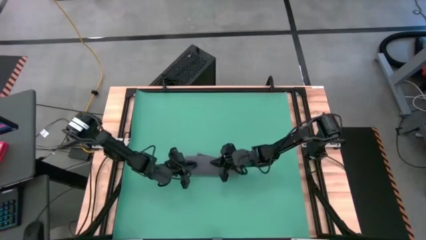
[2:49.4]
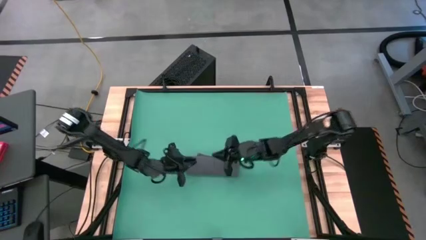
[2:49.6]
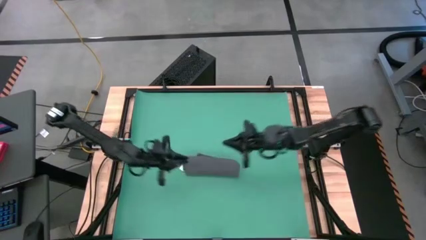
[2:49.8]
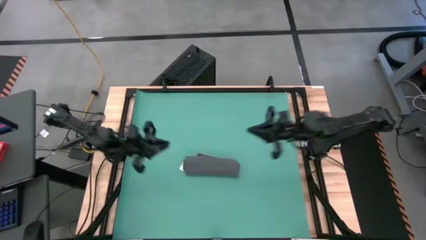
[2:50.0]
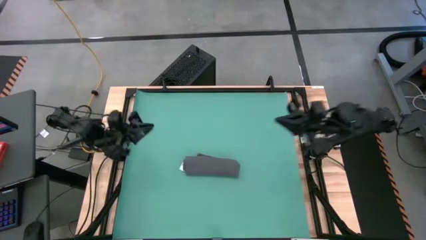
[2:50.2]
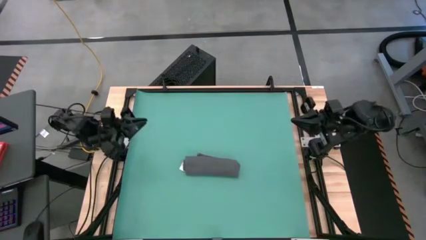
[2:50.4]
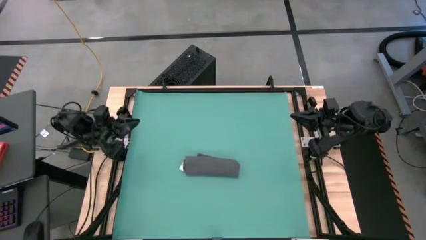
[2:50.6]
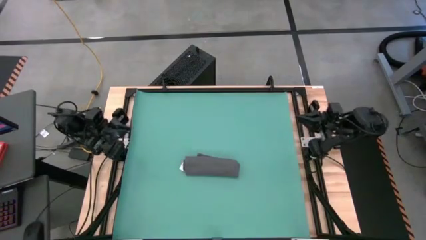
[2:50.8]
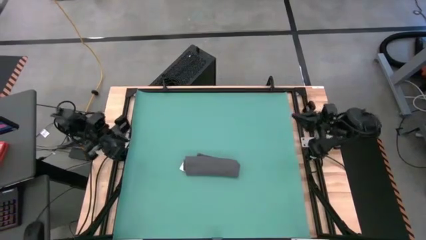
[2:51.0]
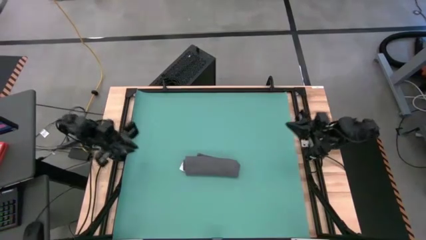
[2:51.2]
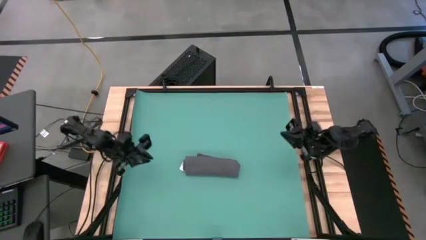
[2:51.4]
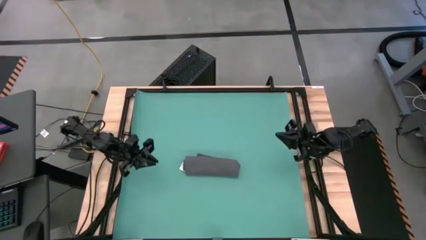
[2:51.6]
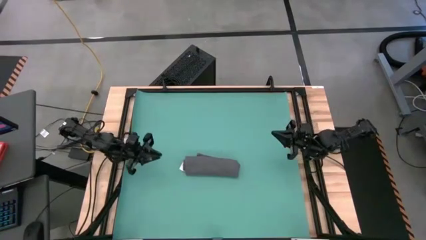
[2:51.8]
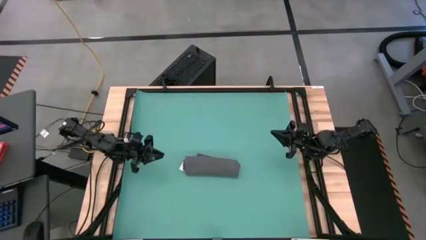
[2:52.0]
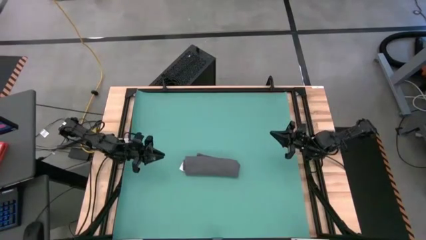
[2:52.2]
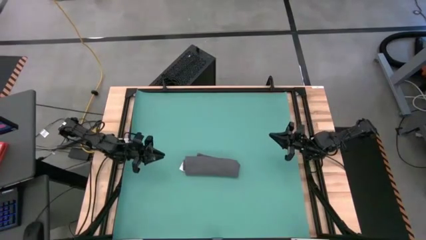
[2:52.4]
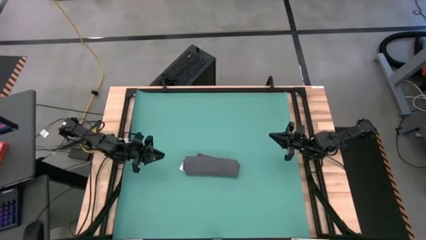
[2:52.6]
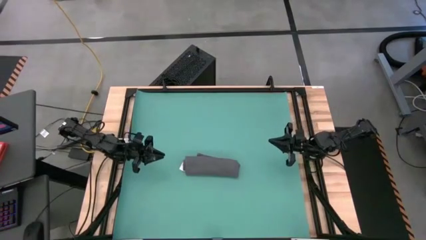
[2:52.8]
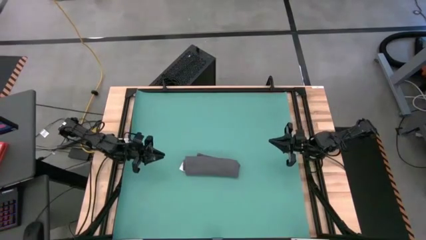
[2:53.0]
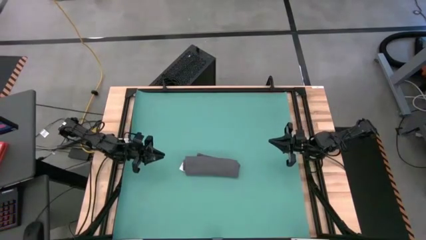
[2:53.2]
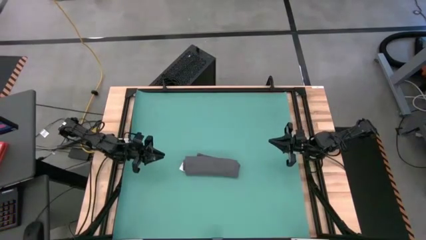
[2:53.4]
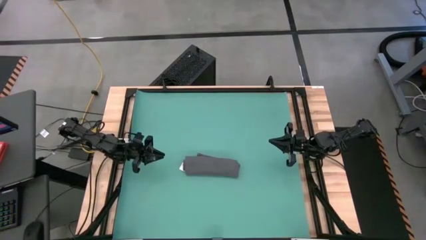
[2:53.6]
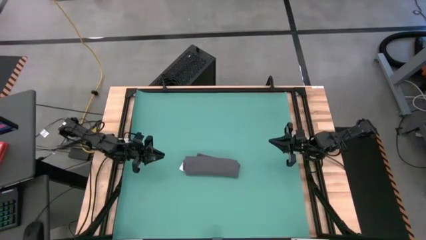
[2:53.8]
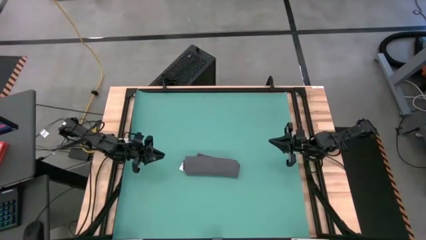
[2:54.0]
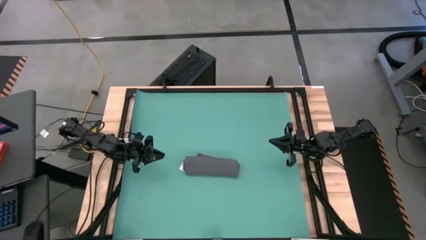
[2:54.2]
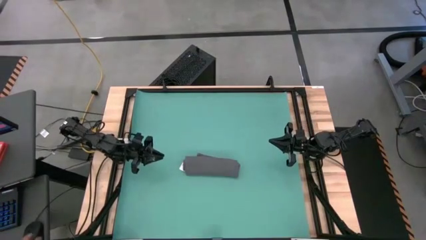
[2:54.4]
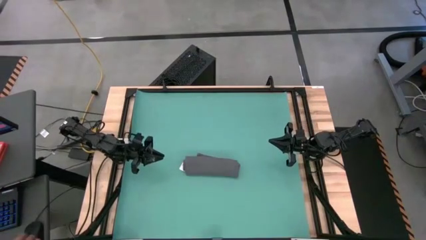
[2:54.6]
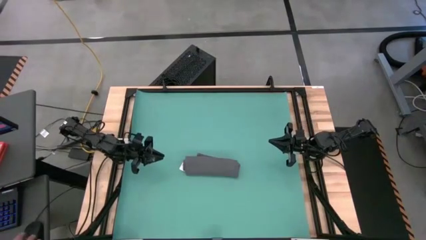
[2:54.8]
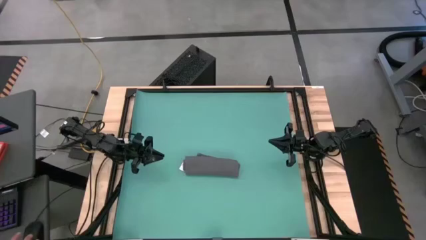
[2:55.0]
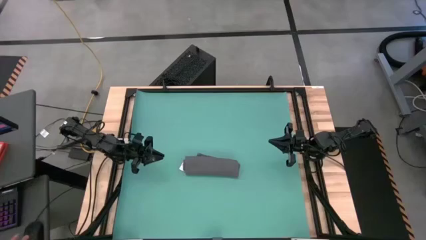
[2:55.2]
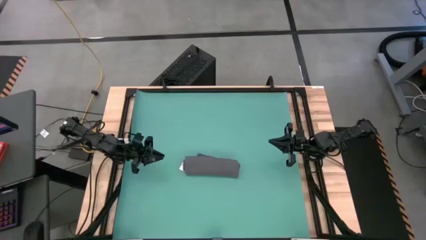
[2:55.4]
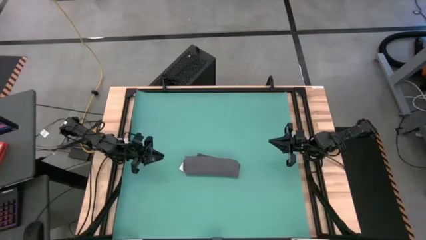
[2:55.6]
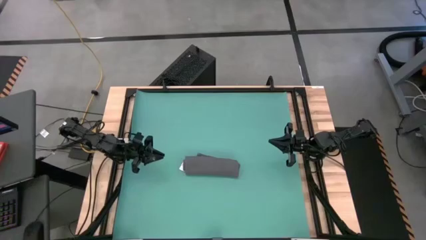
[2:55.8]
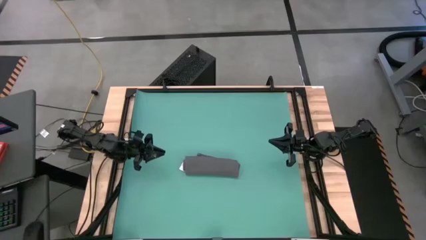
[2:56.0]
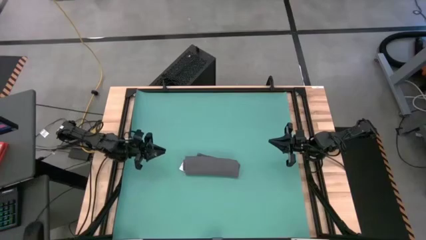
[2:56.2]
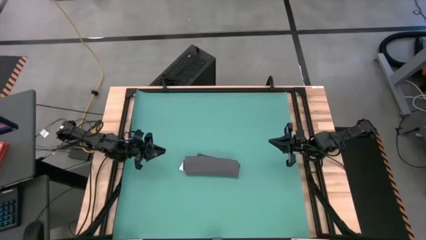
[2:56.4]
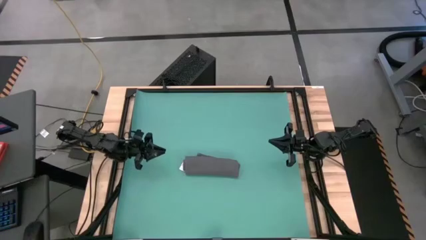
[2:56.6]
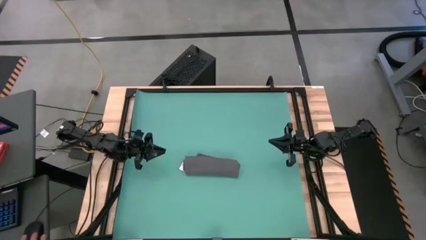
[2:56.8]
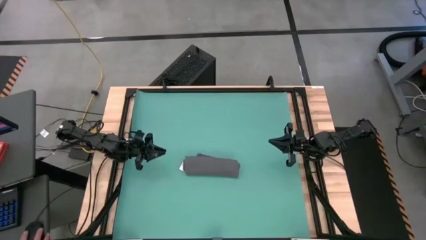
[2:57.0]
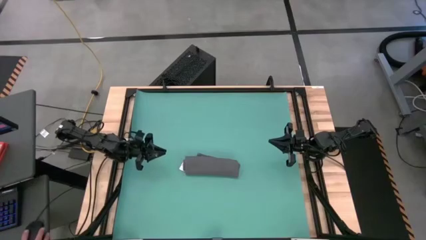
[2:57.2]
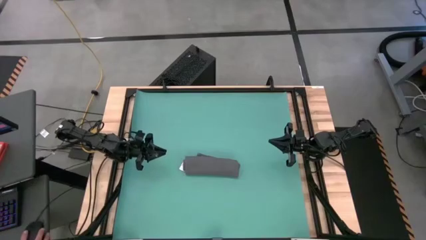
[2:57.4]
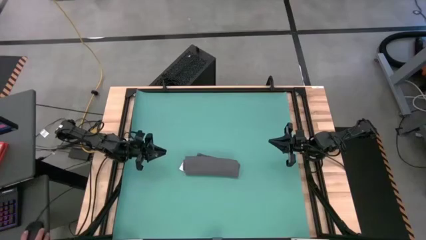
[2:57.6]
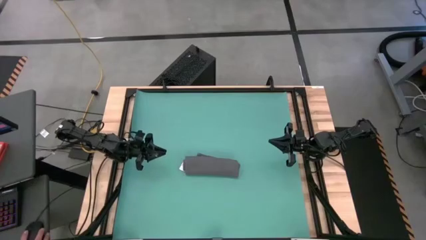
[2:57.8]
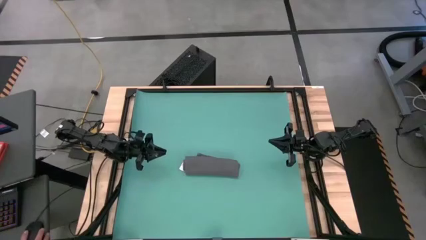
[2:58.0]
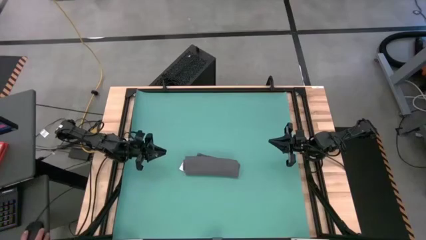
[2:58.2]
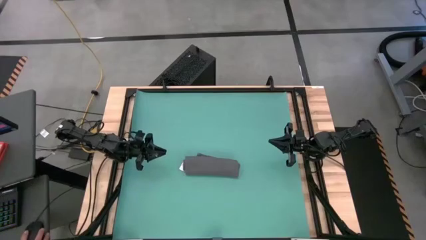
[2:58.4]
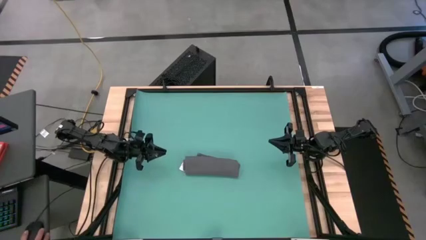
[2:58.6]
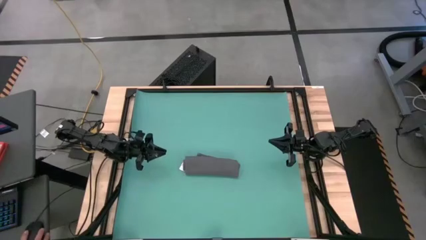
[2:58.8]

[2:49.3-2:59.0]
Task: Roll towel
Return to Home Position

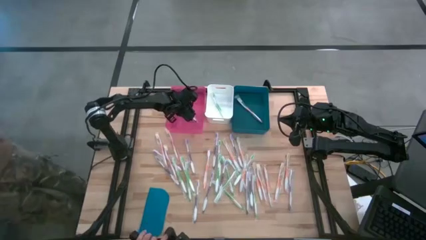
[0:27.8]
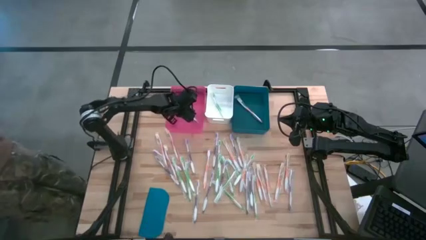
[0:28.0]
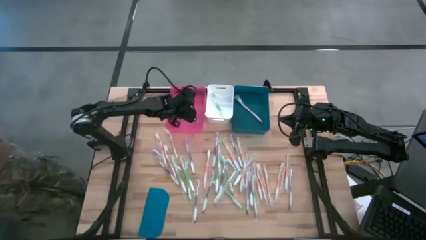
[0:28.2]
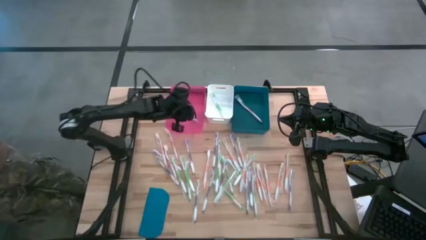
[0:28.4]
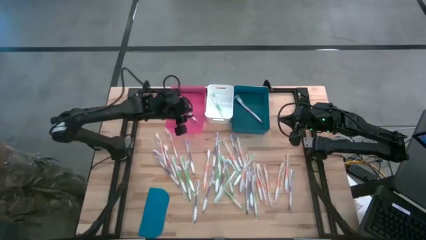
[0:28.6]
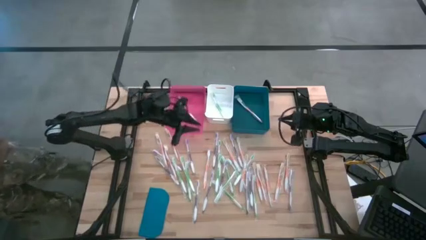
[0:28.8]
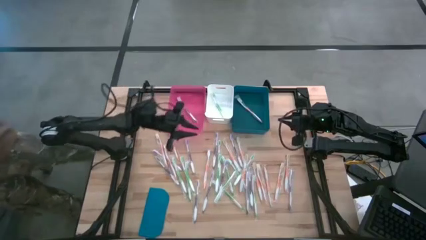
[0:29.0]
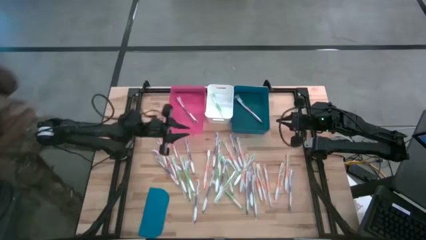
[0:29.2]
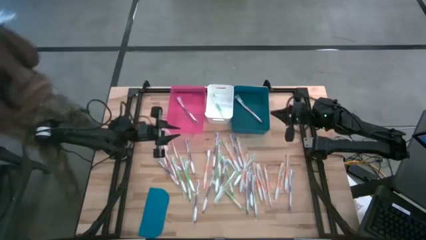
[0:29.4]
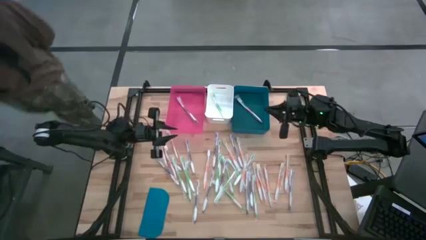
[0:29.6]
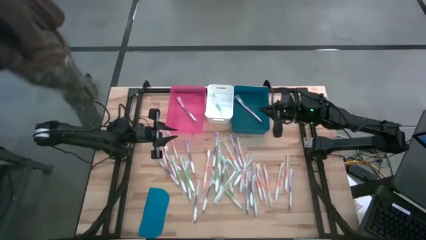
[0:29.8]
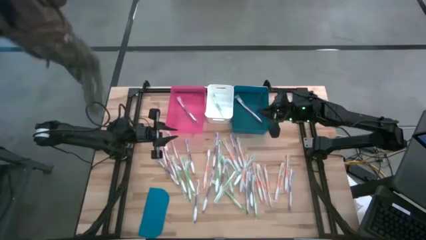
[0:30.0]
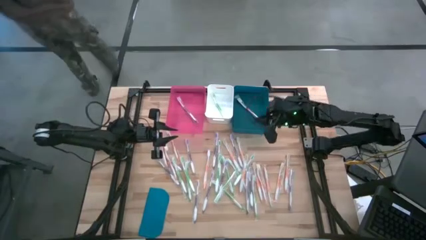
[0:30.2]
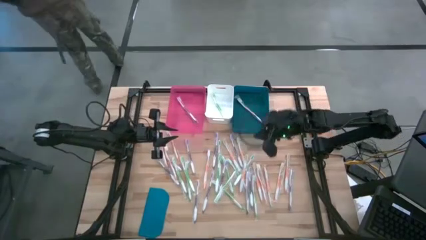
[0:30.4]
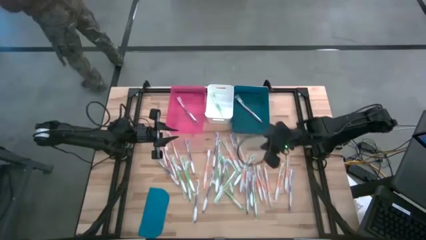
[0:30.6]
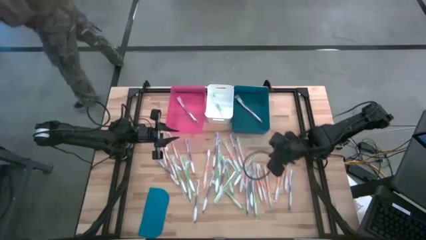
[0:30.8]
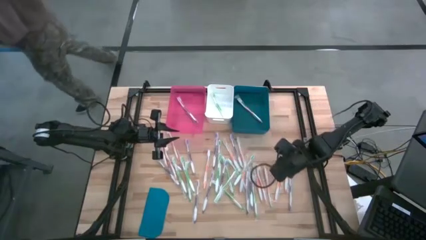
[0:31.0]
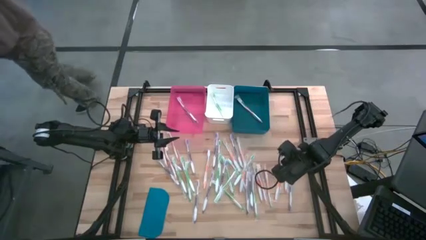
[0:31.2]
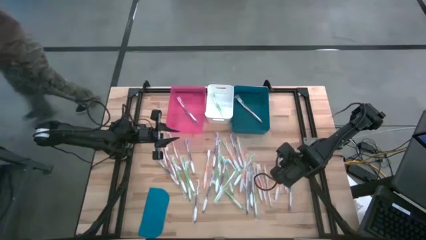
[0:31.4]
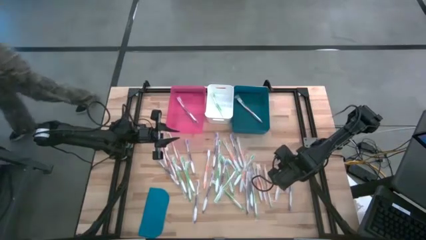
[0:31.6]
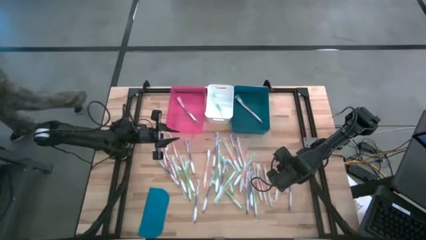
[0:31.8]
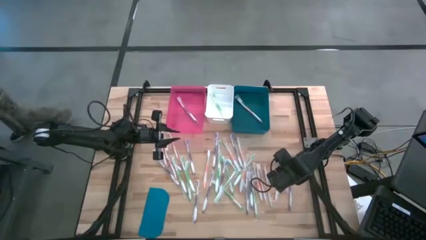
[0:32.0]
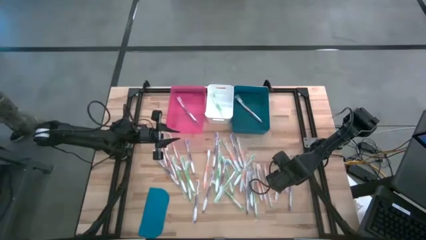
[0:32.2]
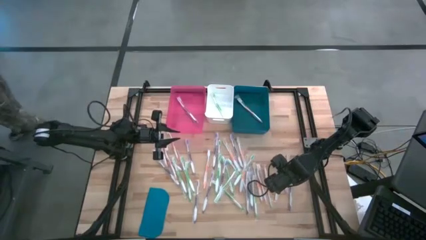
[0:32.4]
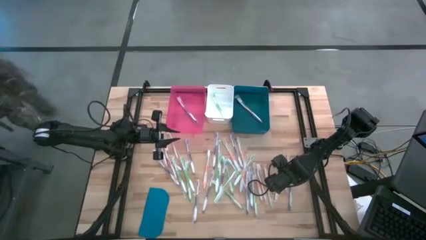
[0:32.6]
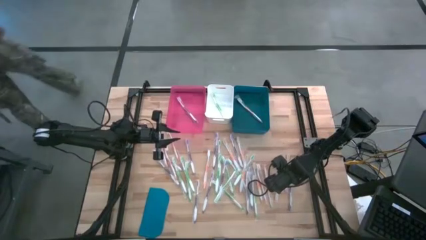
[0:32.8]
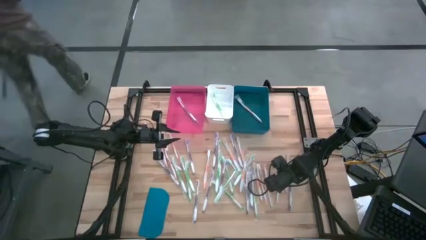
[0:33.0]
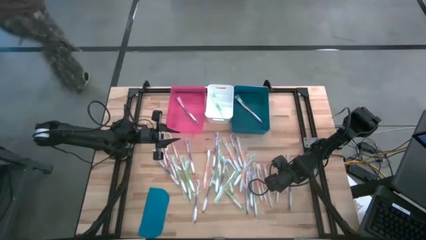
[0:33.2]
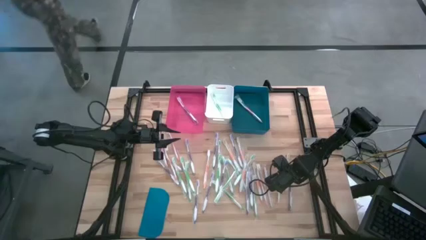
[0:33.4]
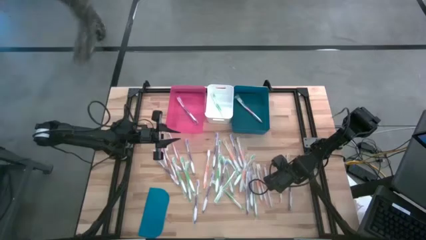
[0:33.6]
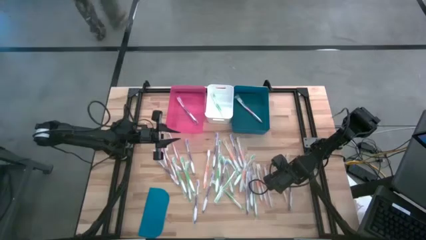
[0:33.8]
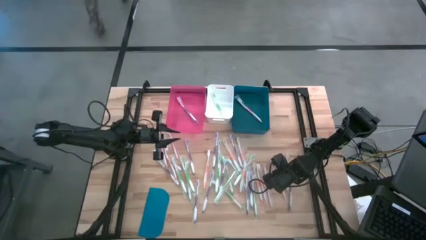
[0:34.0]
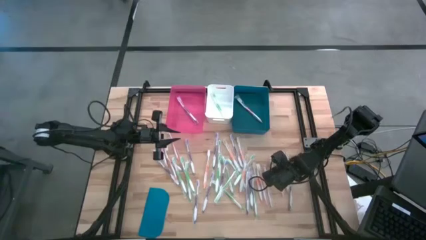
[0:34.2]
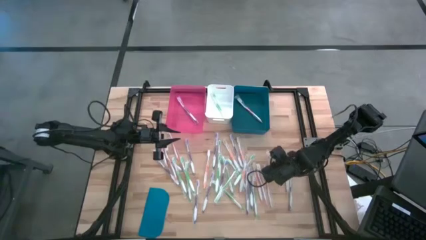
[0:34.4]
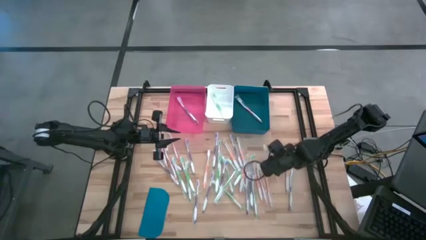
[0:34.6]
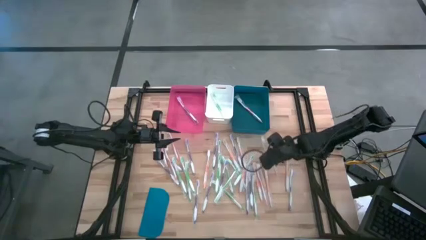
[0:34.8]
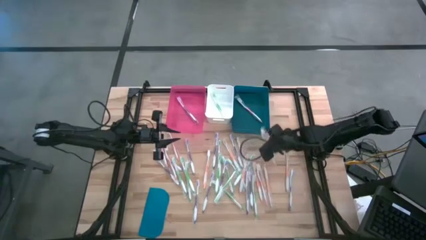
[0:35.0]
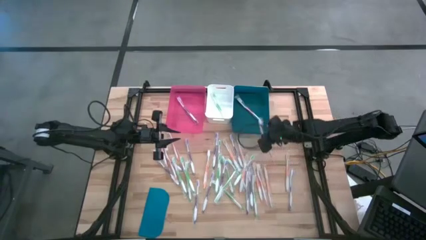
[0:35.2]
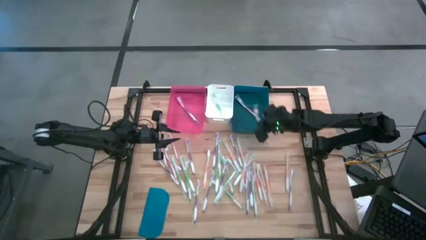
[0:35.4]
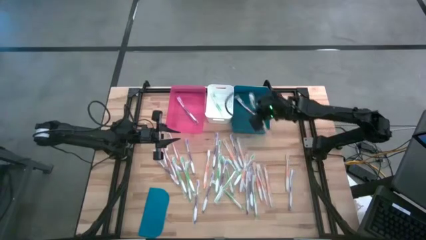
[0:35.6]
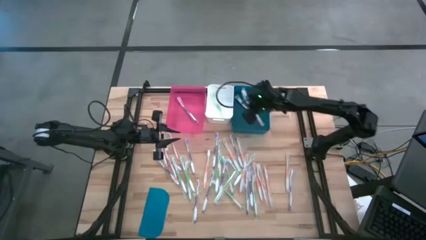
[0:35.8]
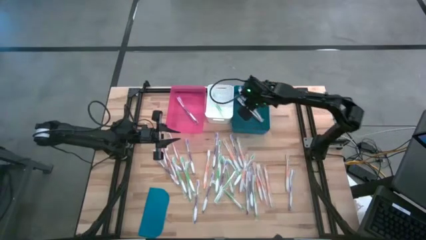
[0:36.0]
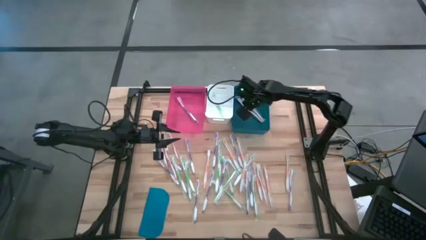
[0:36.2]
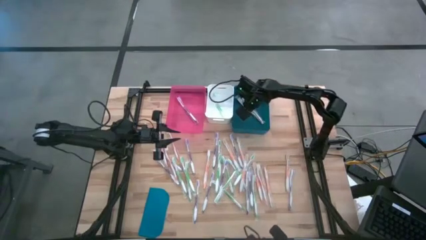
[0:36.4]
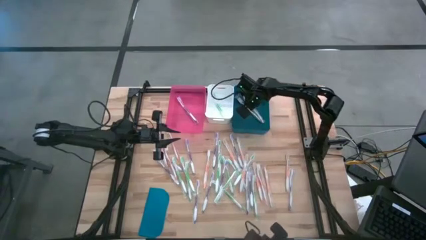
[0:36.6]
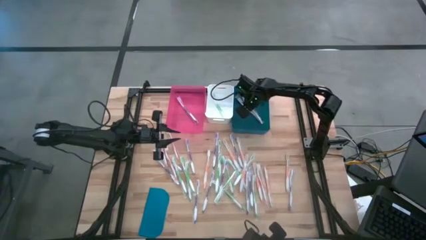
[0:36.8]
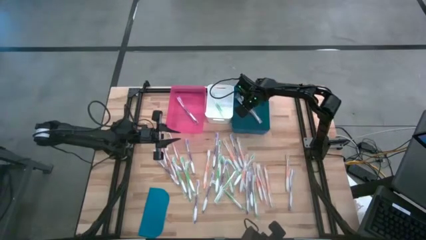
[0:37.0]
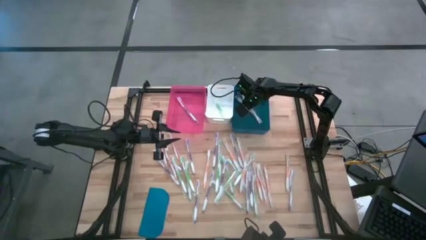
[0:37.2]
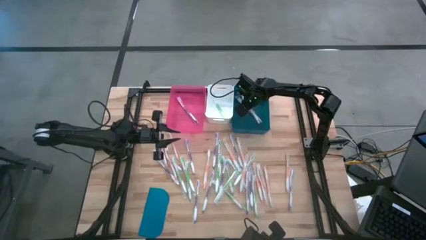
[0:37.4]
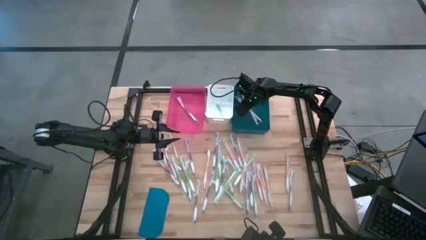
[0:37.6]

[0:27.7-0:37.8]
Task: Pick & Place Toothbrushes
Put the orange toothbrush into the blue bin
